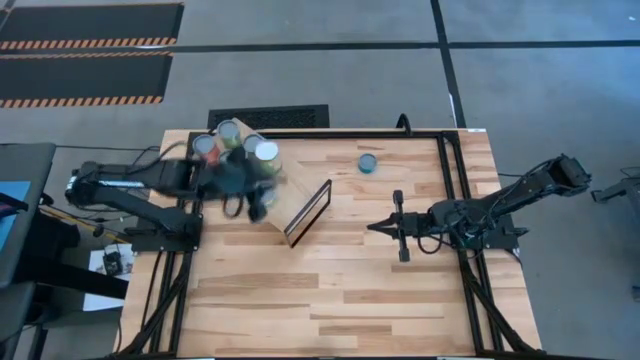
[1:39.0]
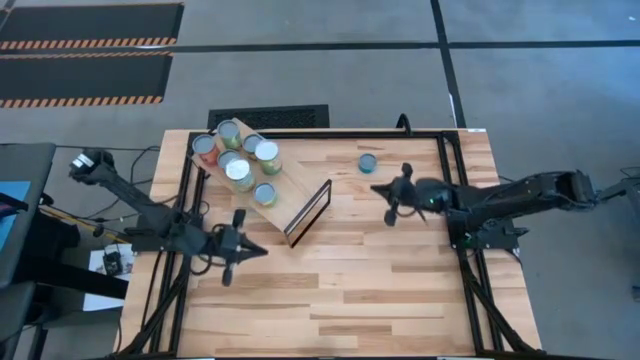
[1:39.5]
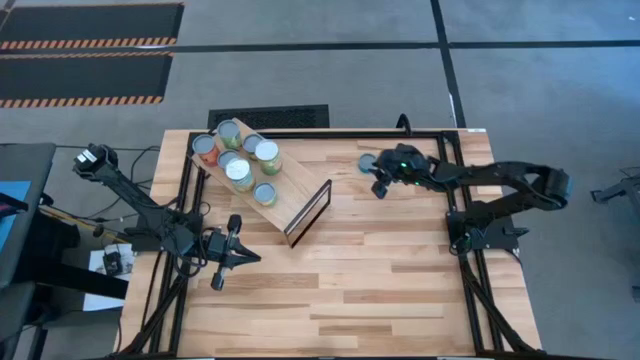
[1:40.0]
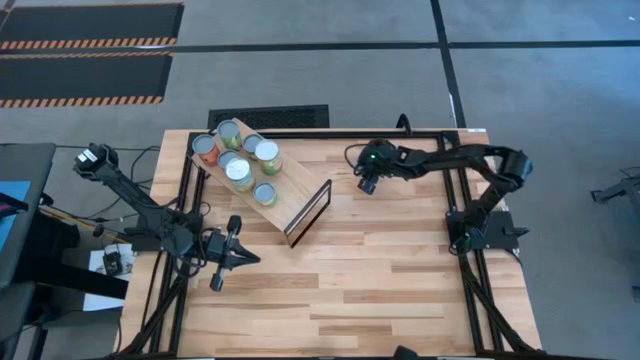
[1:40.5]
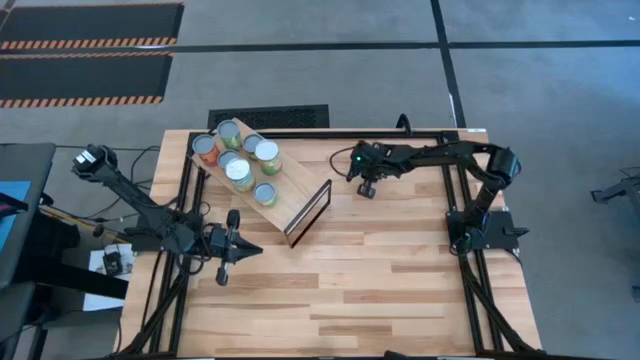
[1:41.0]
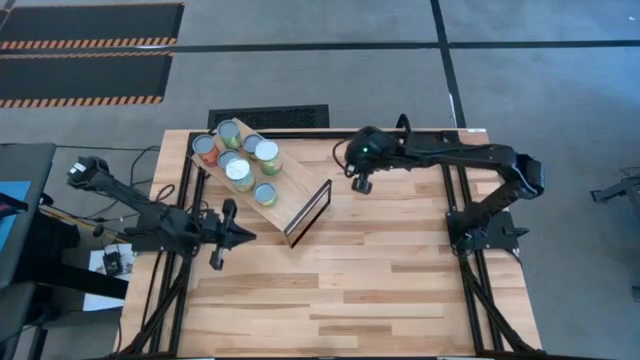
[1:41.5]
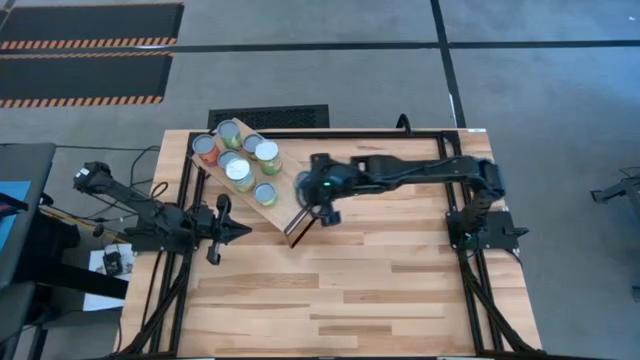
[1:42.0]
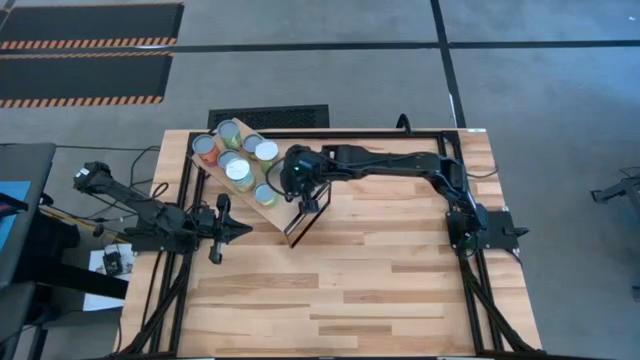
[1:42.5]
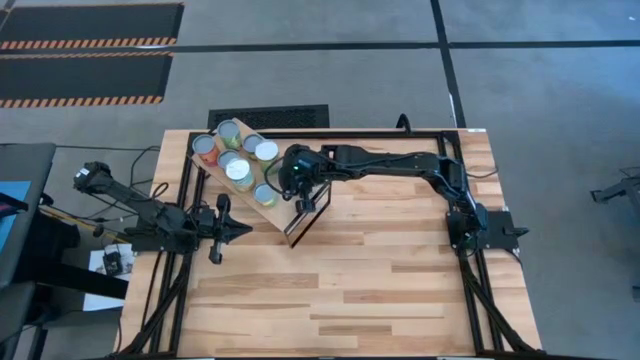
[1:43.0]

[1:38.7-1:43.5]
Task: Pick and place cans onto a shelf
Put the canned tuna fish on the shelf

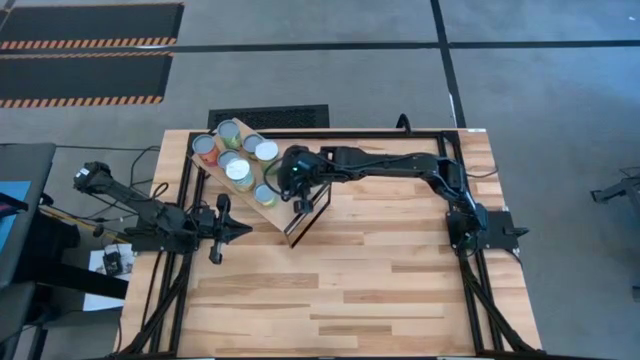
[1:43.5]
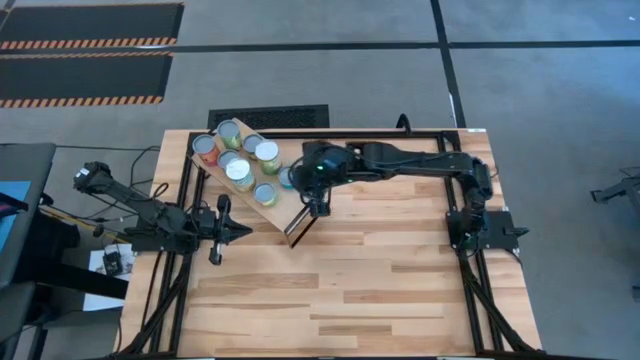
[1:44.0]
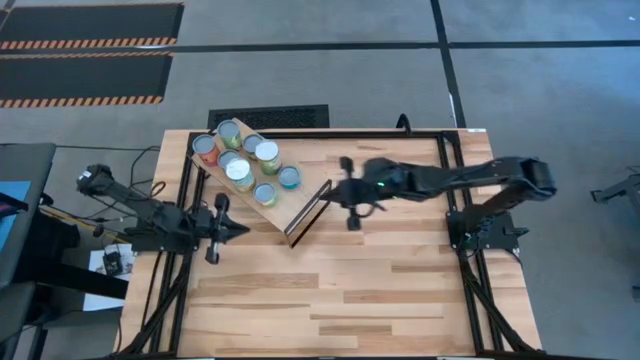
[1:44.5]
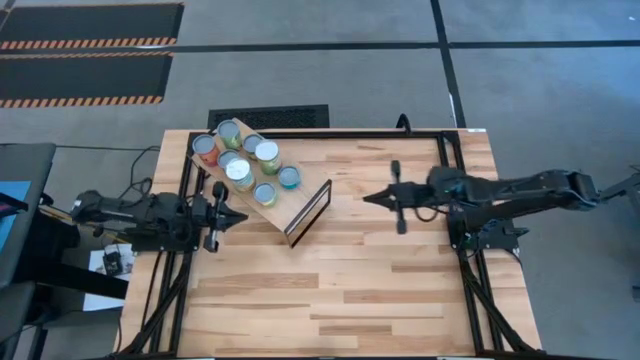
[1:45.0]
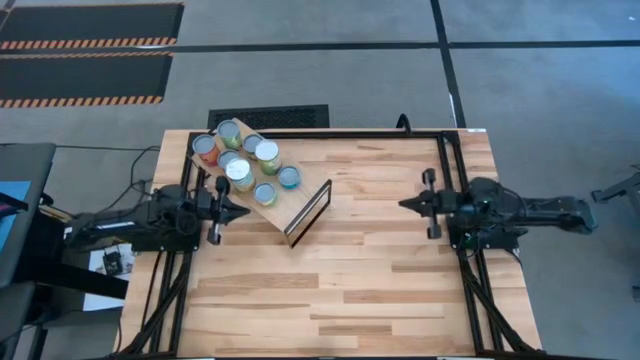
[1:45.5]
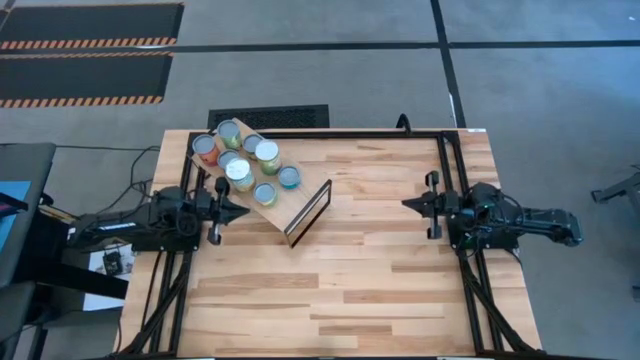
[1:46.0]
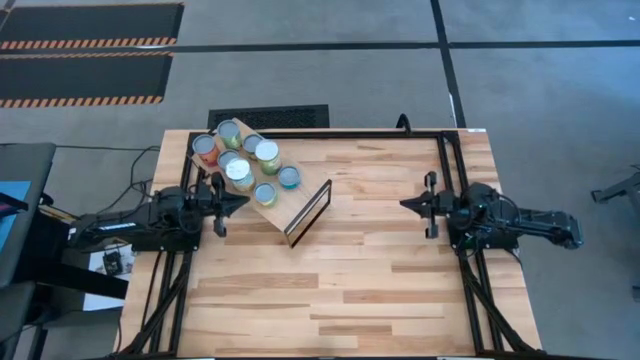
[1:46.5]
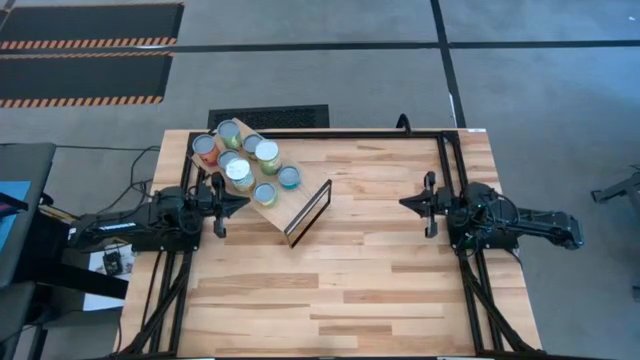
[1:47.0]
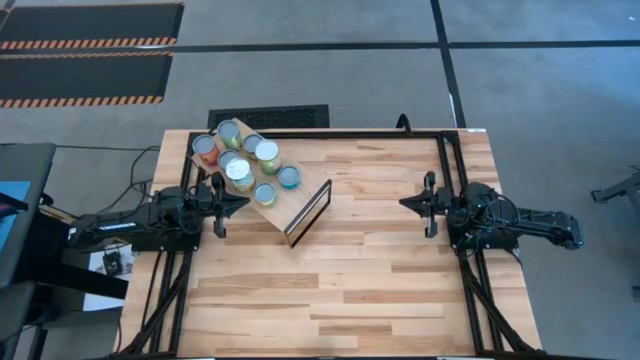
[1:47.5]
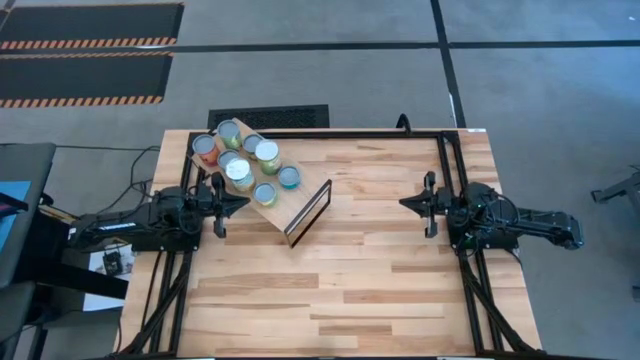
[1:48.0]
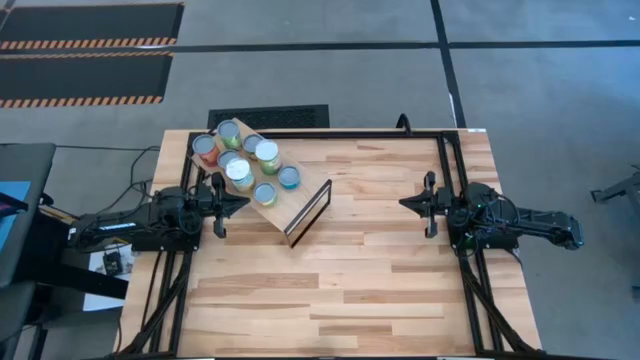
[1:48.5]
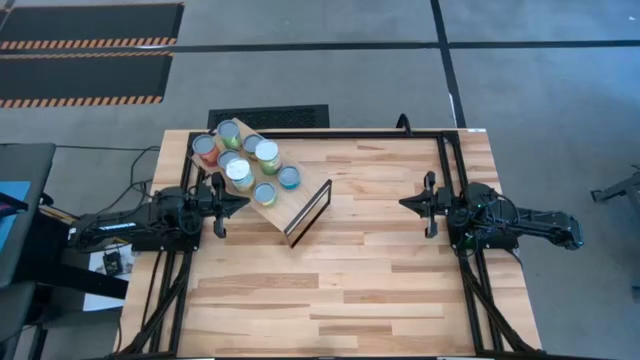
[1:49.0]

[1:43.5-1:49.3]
Return to Home Position

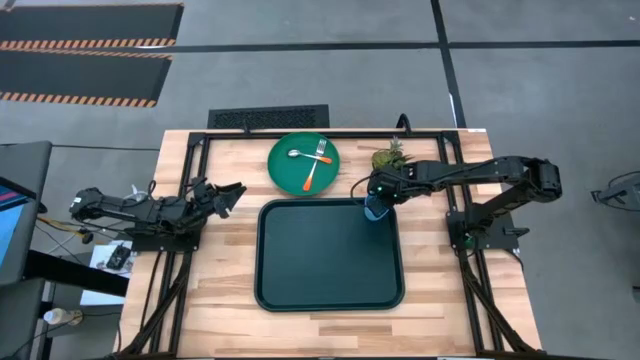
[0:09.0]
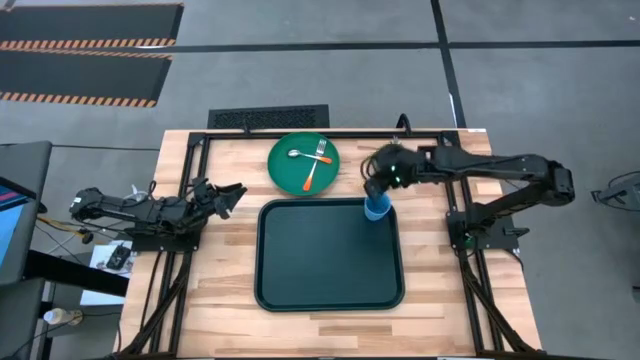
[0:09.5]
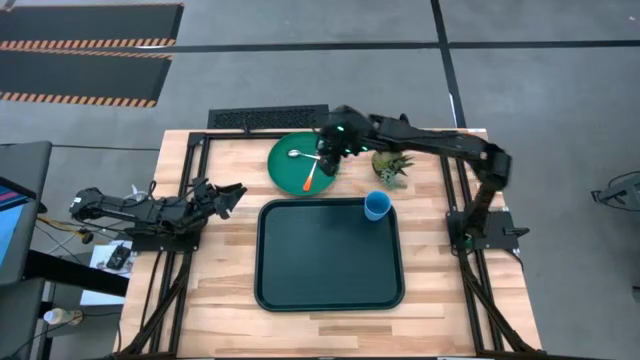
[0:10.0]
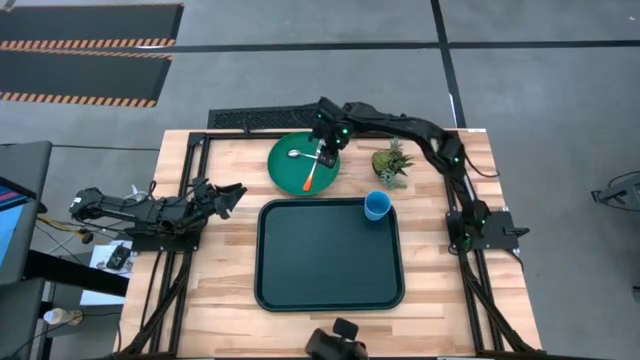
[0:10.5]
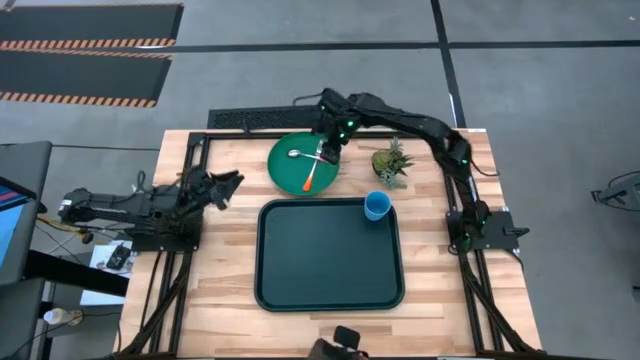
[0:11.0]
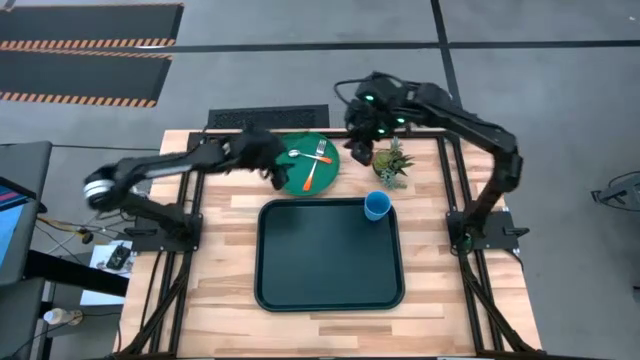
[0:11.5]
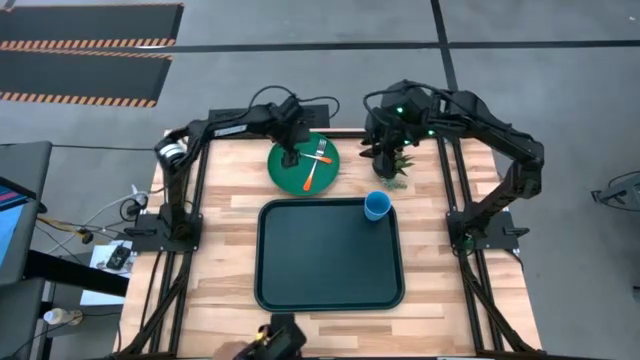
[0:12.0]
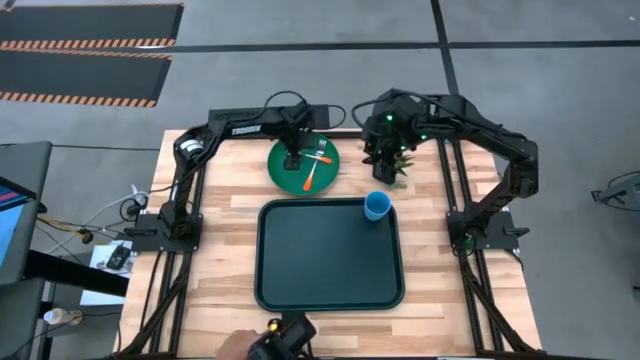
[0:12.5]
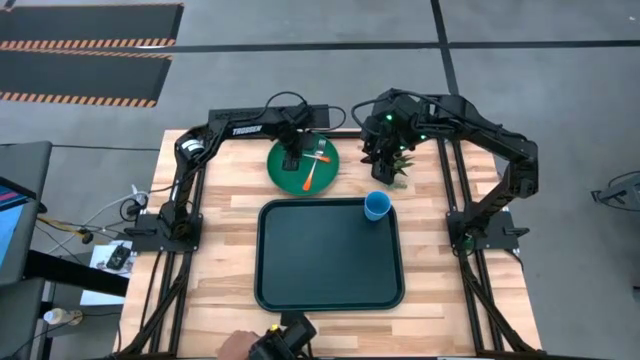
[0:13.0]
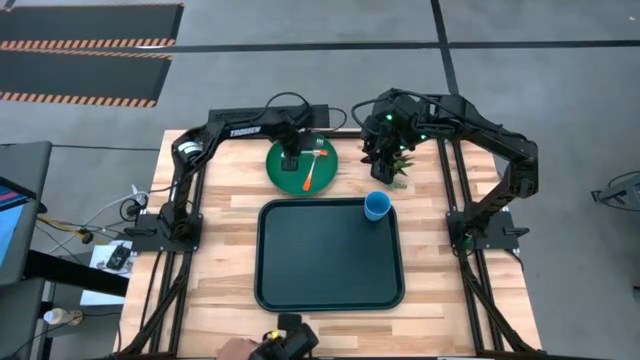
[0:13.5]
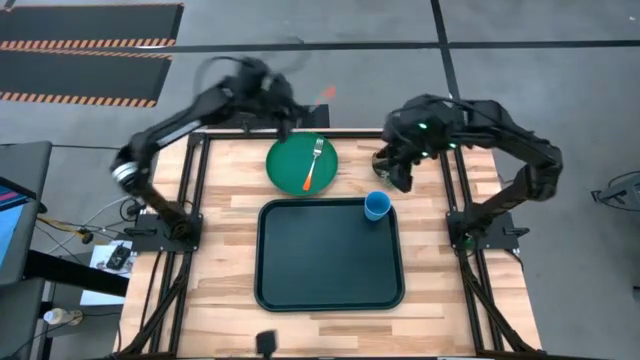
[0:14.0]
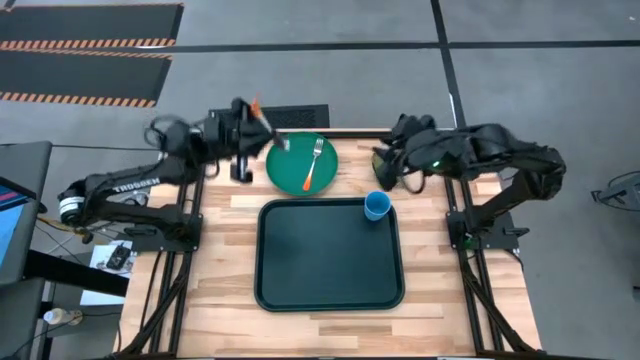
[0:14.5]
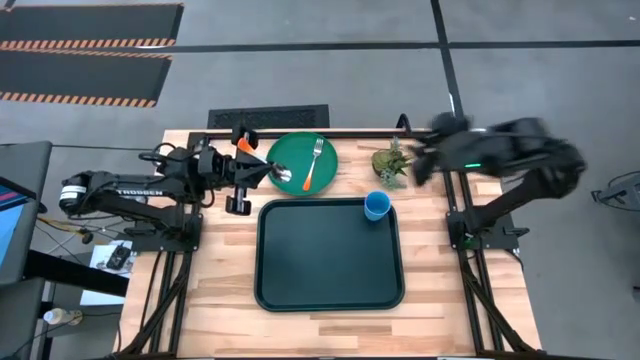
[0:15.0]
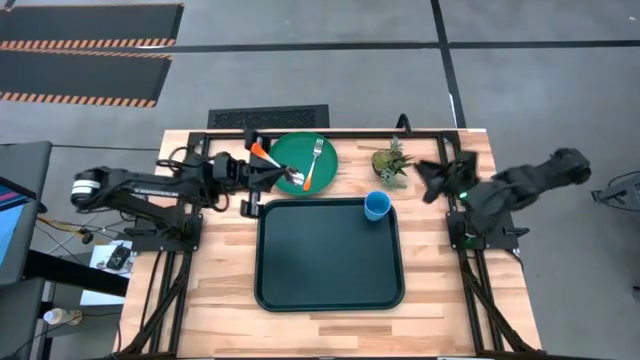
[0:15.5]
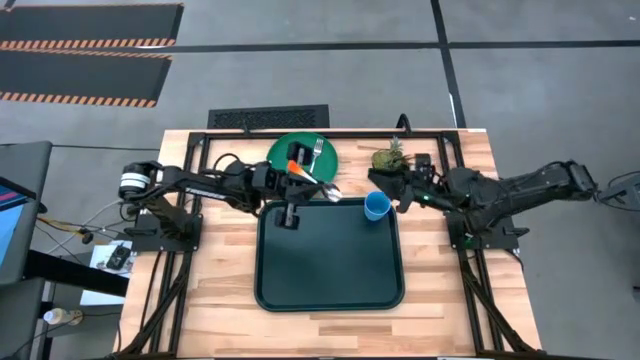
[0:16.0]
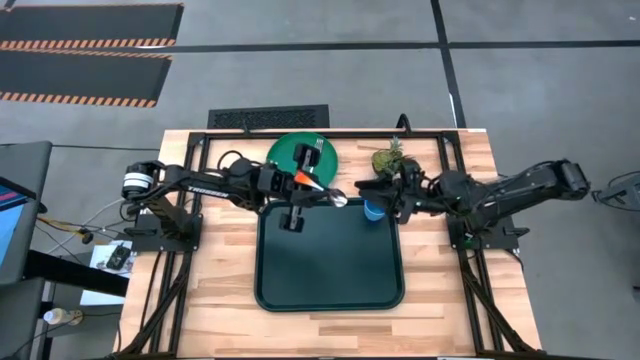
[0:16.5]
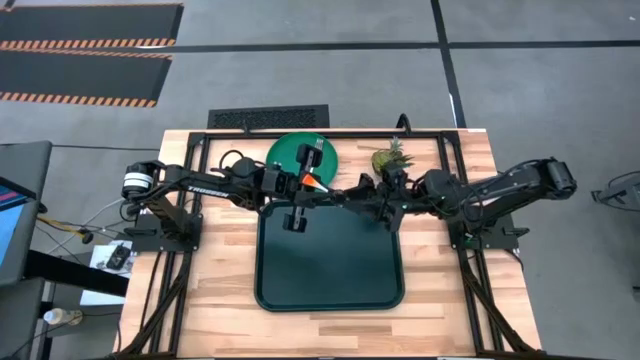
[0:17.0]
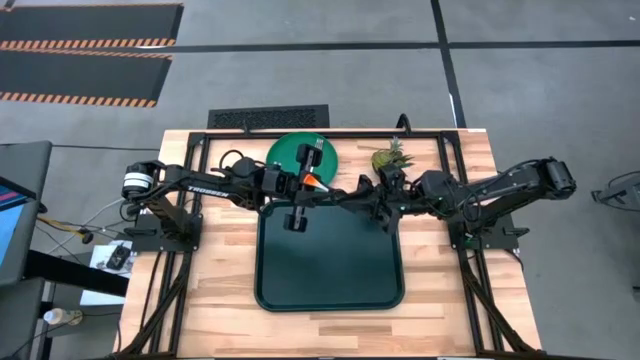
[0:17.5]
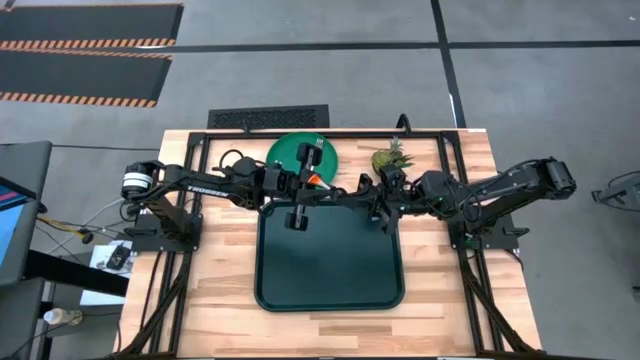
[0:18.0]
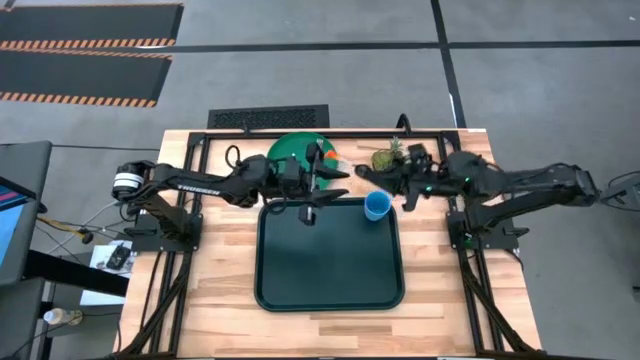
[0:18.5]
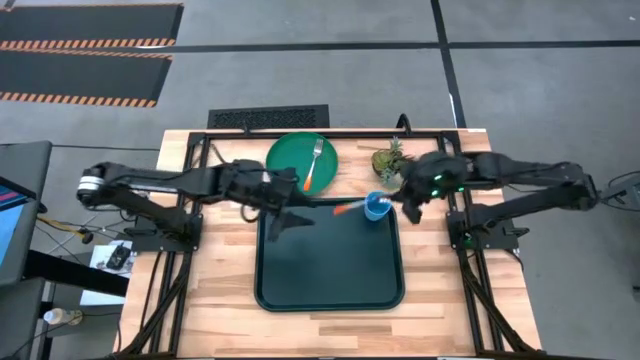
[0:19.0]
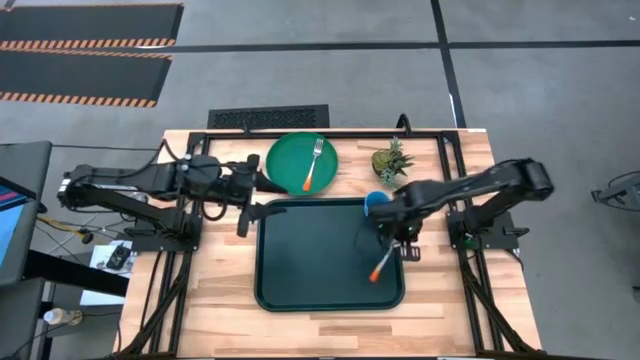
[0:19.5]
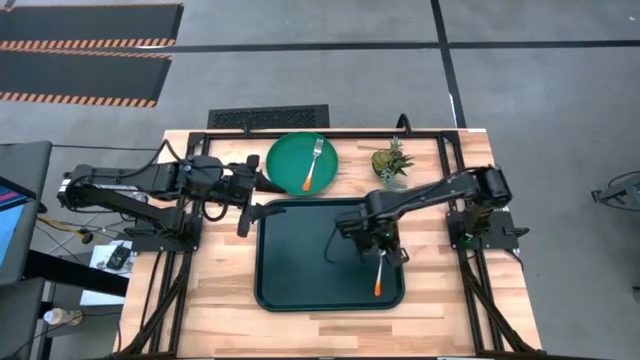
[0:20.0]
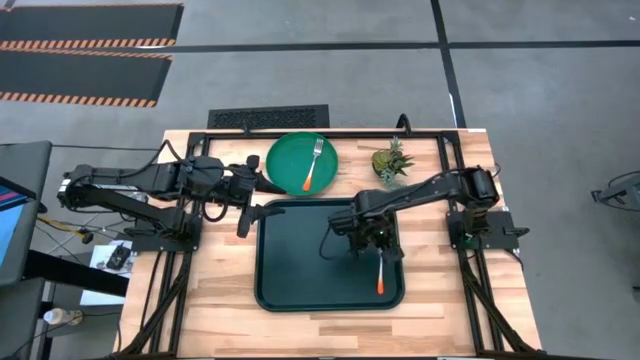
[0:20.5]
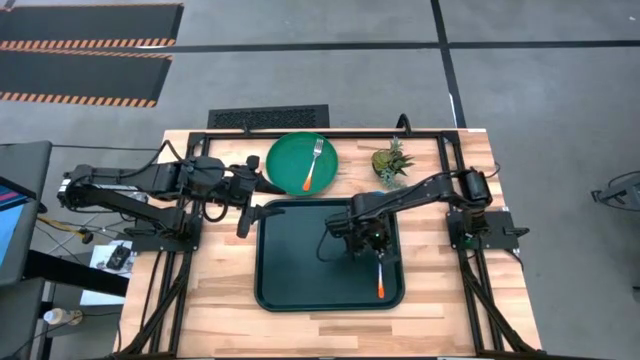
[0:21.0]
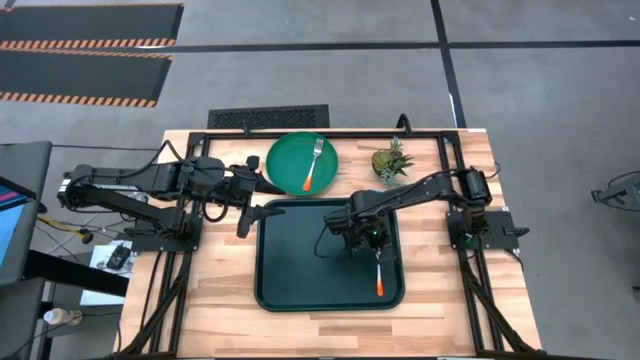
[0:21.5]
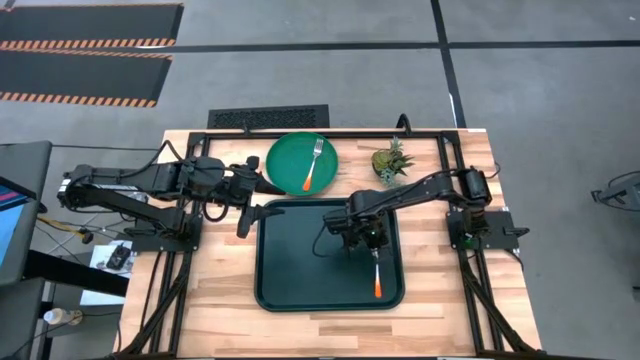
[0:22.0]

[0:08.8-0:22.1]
Task: Pick and place plate/cup/fork/spoon on tray
Put the orange spoon to the bottom of the blue cup on the black table tray
